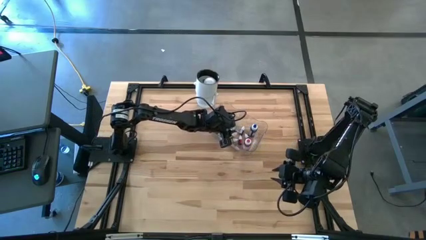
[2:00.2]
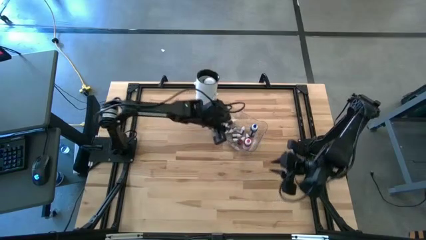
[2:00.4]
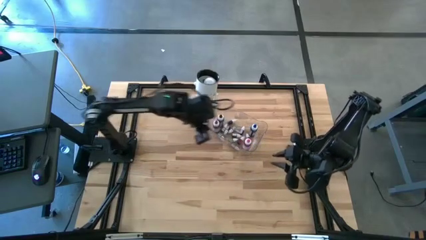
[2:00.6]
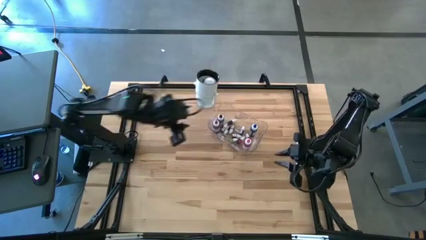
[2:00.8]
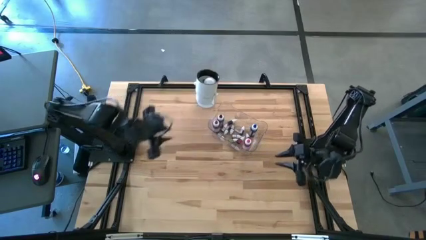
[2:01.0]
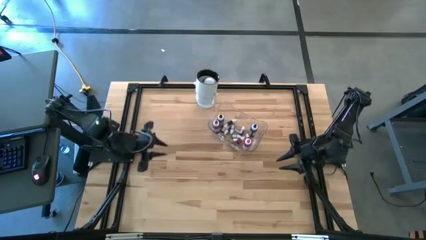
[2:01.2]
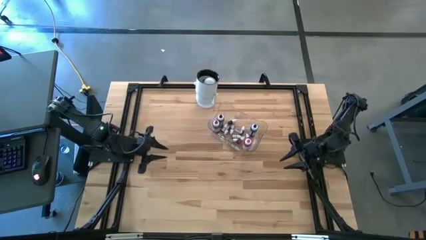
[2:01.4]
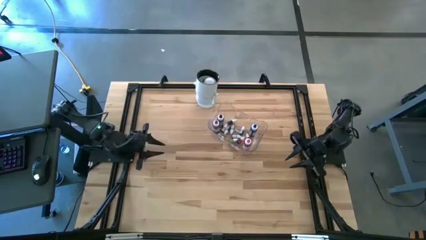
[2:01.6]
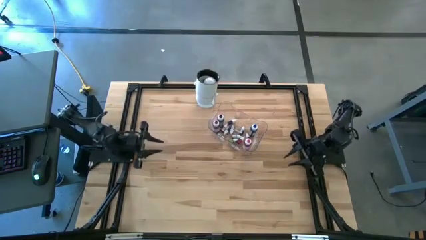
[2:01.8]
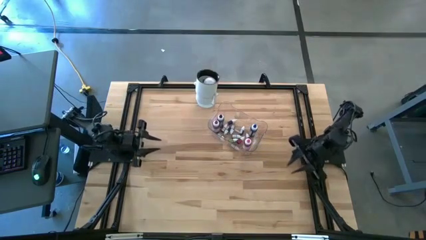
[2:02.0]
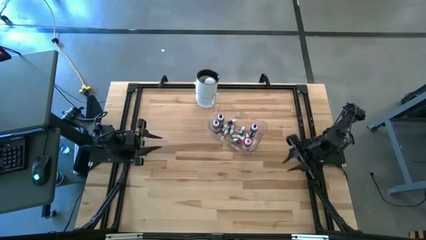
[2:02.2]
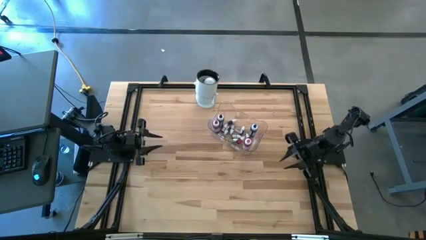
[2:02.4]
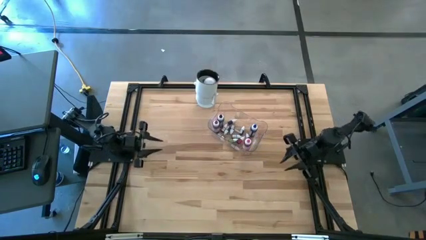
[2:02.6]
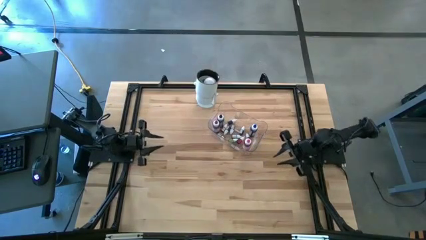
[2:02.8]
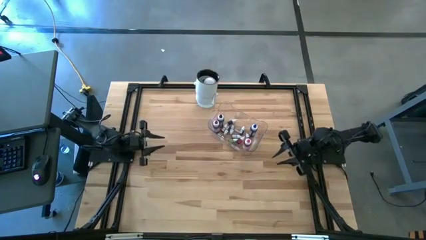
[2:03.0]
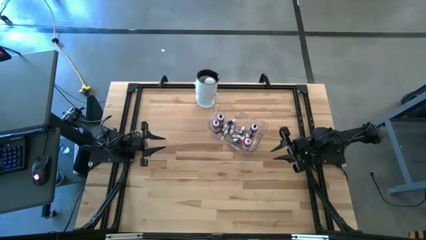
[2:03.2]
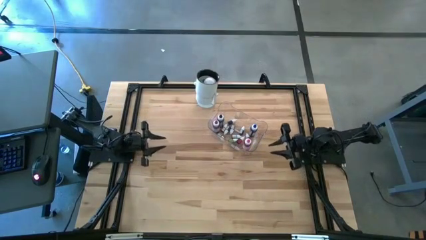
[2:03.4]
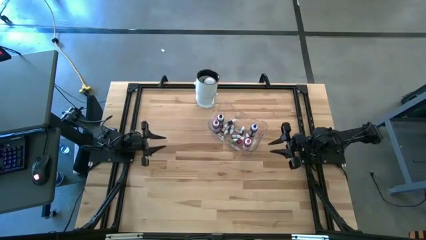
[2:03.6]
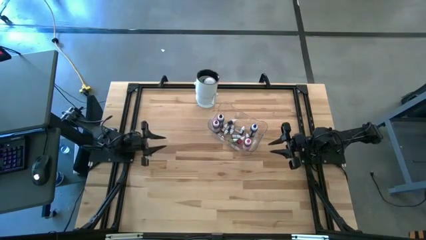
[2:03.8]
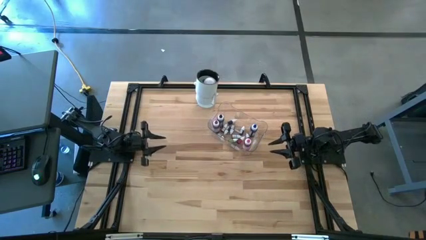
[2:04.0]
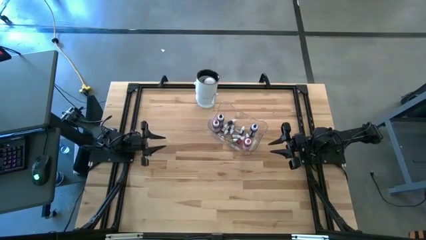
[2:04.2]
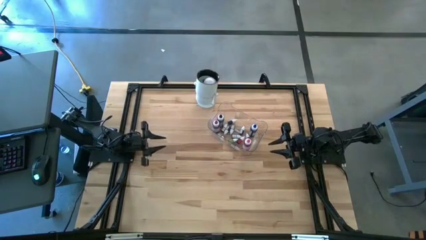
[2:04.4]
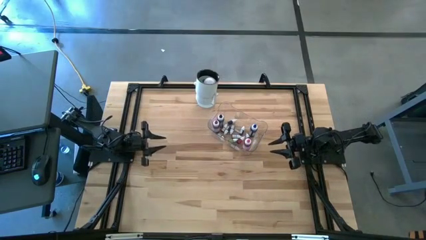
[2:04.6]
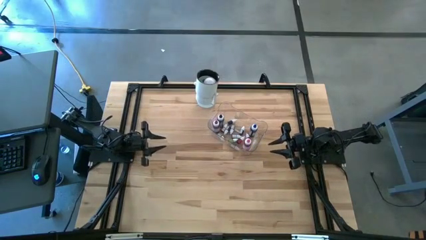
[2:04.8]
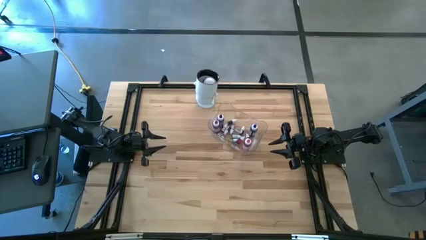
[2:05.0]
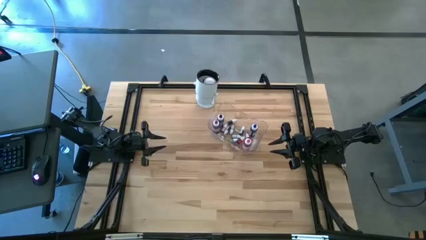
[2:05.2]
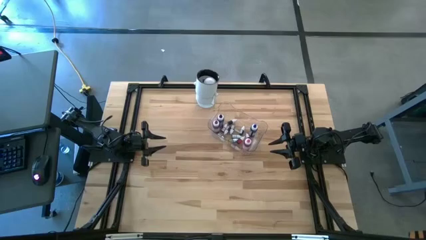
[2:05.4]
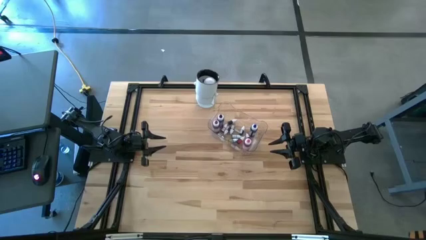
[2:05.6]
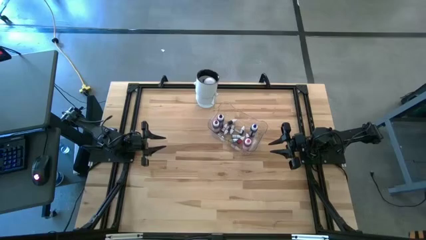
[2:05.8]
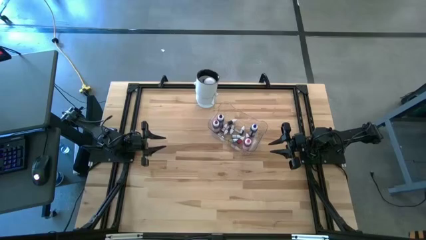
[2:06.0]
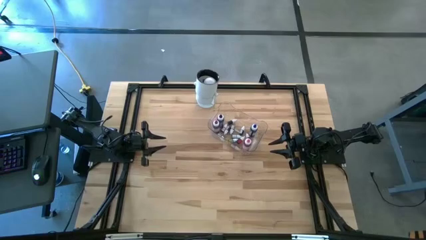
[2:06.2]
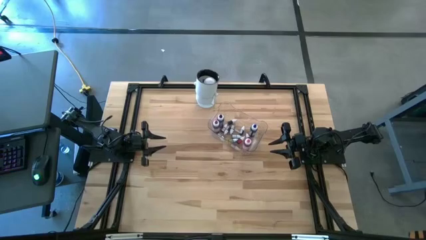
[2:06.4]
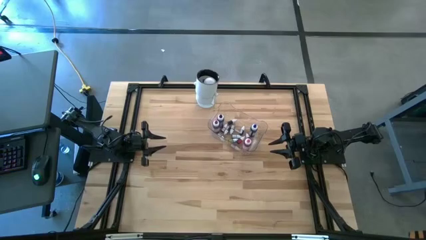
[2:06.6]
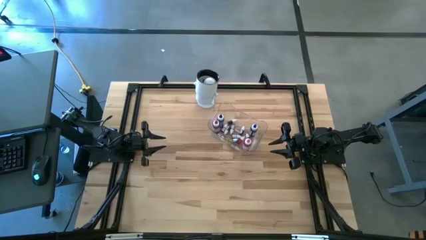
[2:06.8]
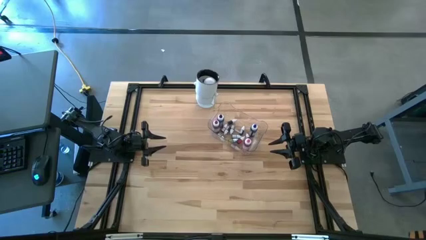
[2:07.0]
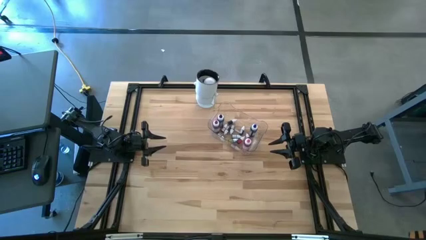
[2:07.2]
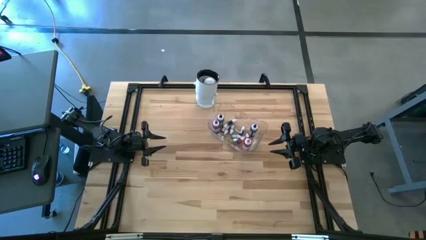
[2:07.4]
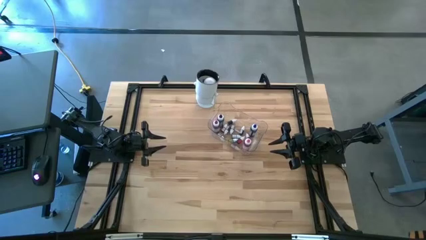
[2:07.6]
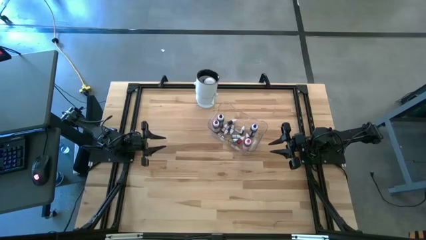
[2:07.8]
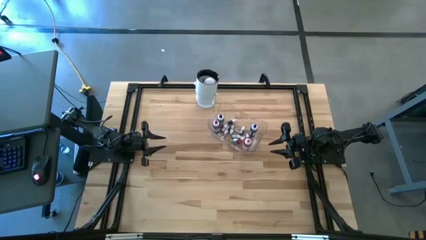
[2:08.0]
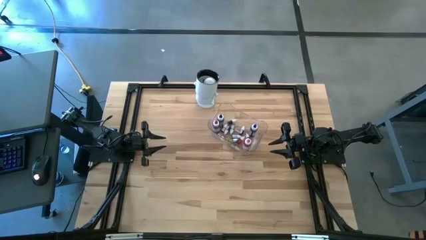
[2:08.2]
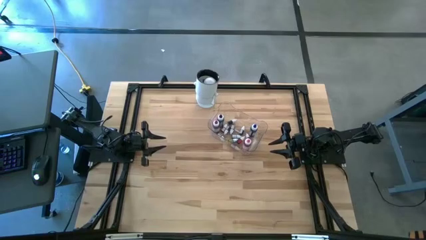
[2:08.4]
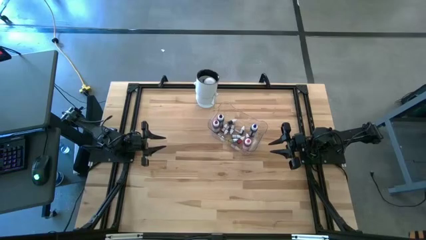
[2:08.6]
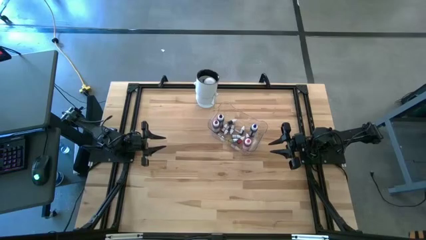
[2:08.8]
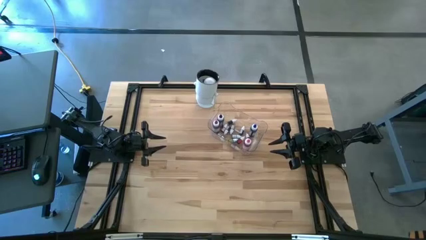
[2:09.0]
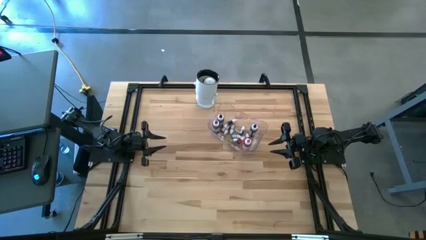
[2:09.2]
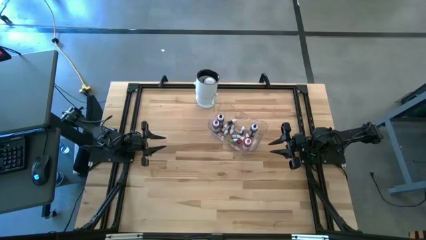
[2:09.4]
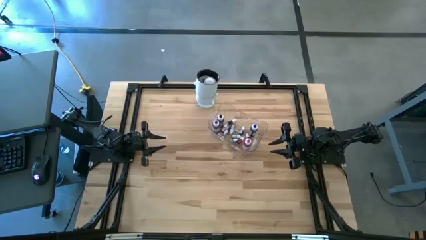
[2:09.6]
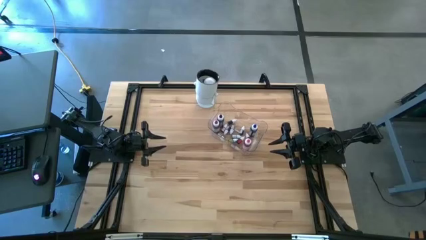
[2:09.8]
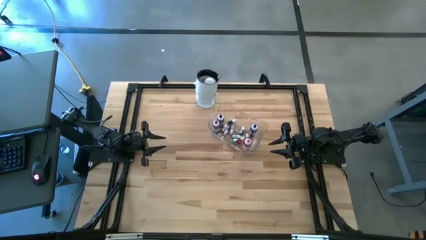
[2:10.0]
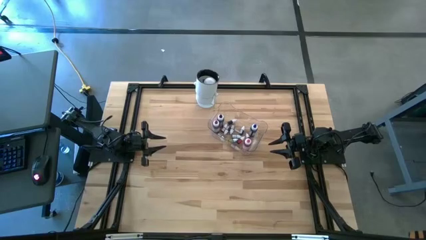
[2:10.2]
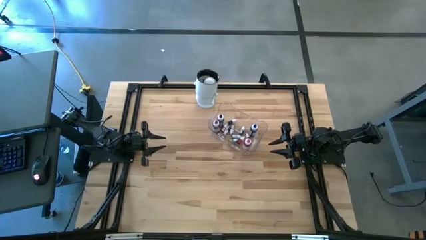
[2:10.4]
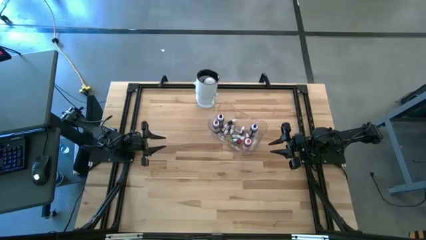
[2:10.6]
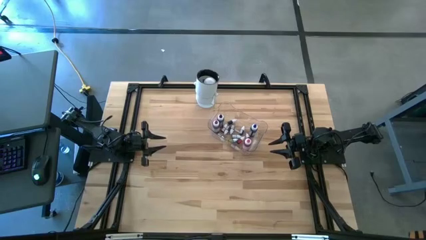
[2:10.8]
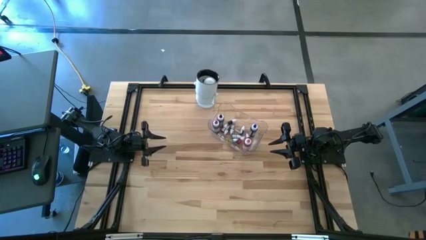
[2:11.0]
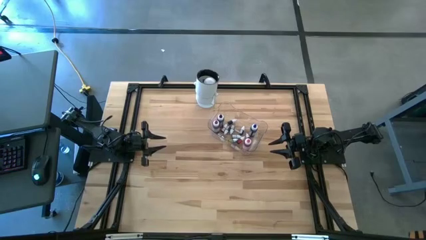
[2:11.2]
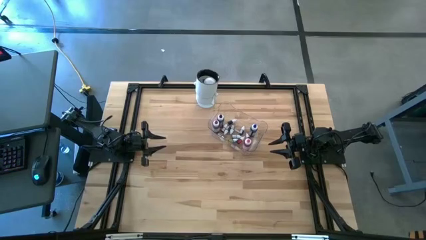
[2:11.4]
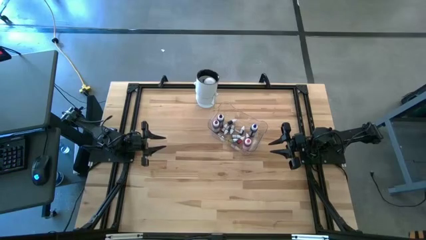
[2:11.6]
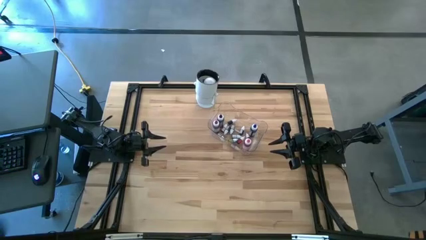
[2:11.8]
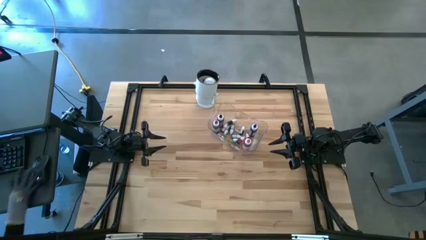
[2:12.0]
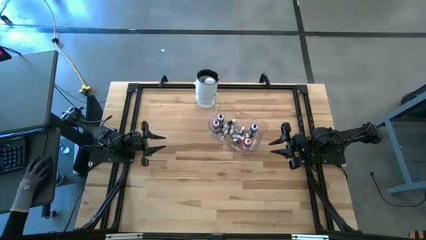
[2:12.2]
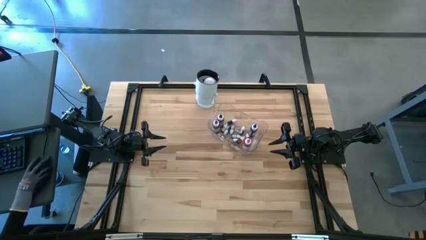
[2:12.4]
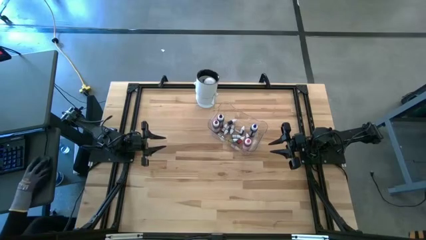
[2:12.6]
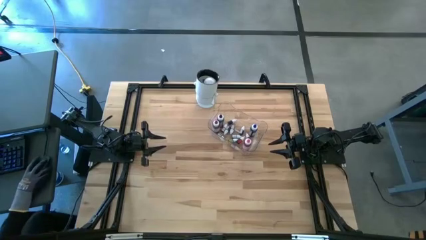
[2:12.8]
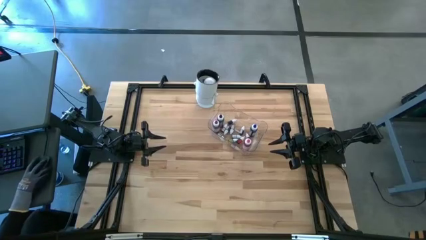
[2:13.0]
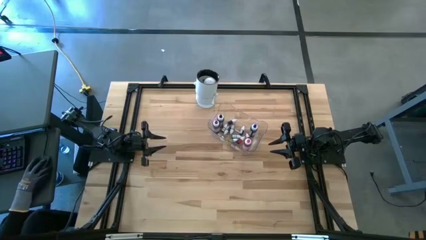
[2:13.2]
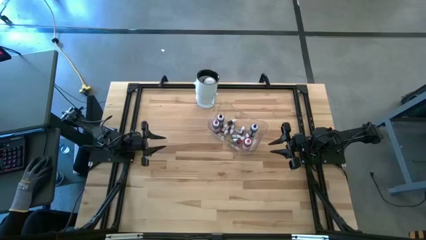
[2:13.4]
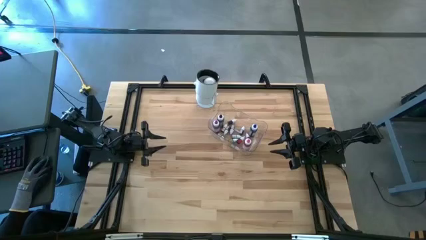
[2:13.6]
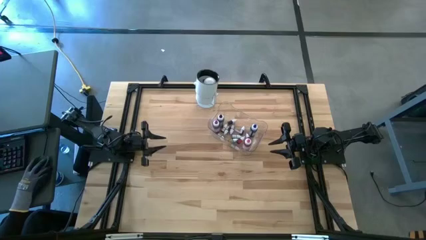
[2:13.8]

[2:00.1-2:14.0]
Task: Pick & Place food coloring
Return to Home Position
